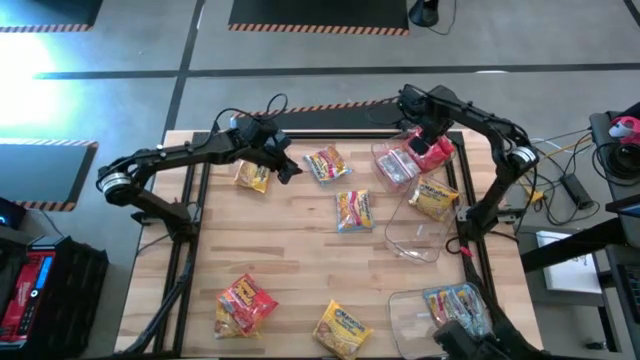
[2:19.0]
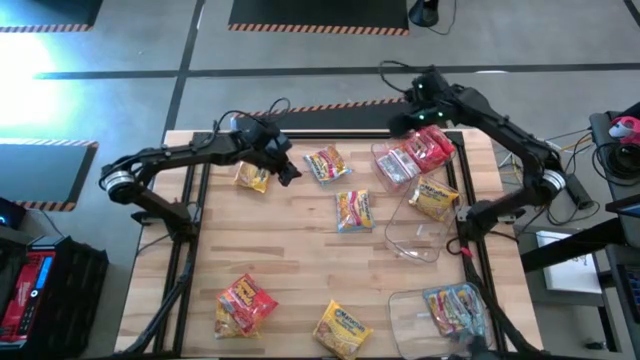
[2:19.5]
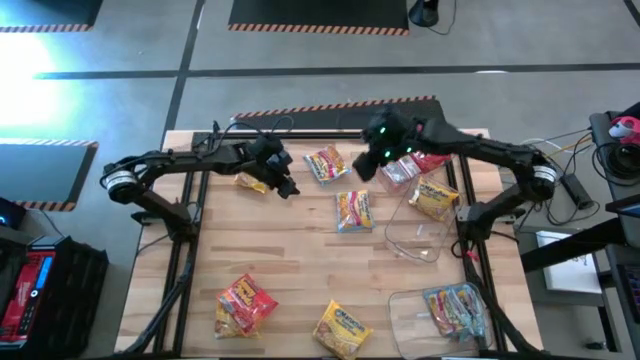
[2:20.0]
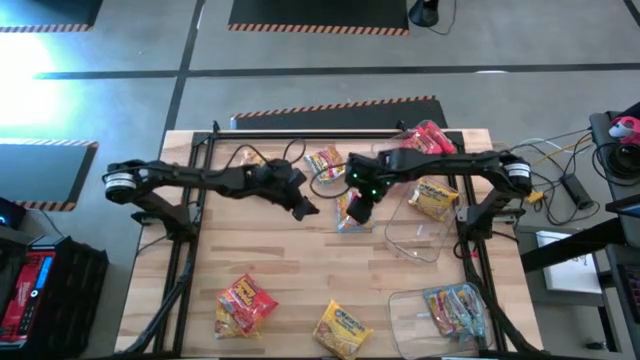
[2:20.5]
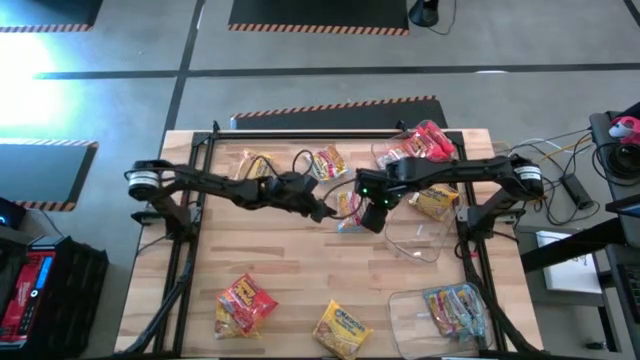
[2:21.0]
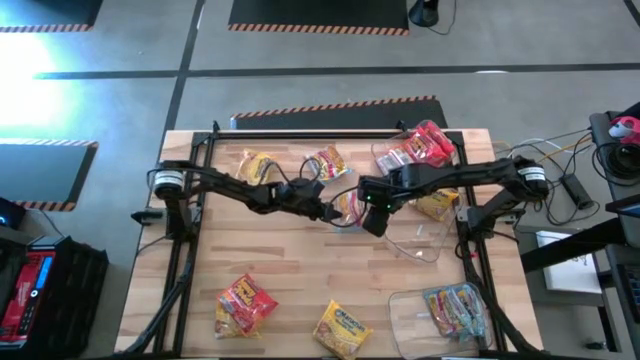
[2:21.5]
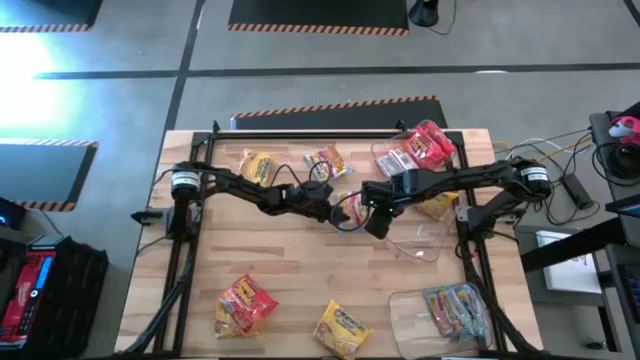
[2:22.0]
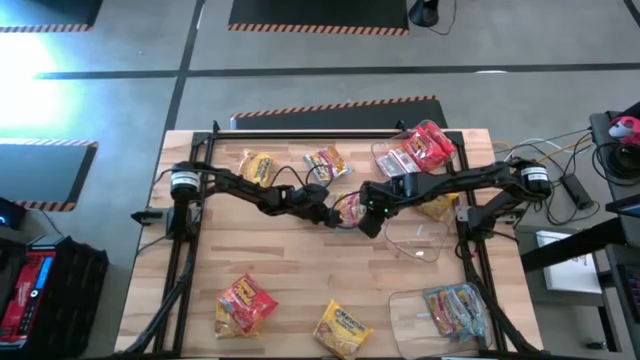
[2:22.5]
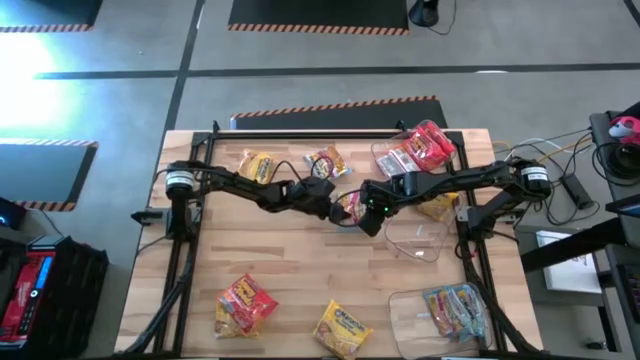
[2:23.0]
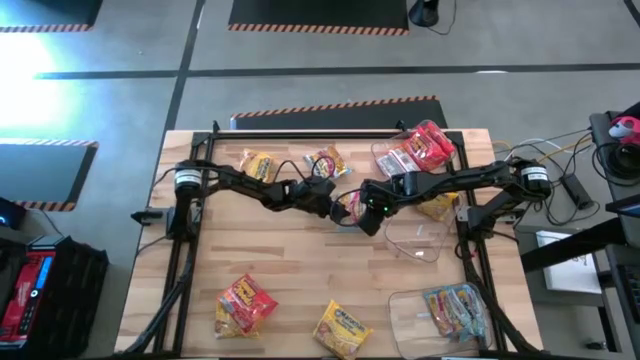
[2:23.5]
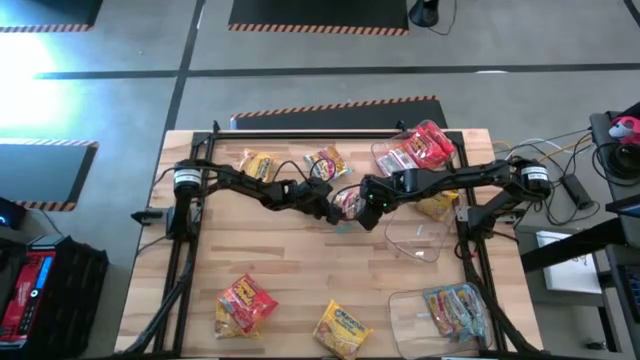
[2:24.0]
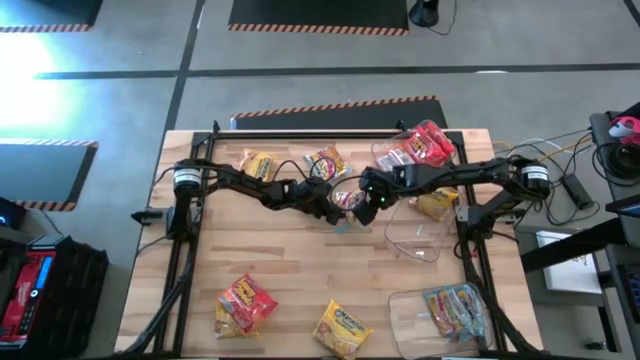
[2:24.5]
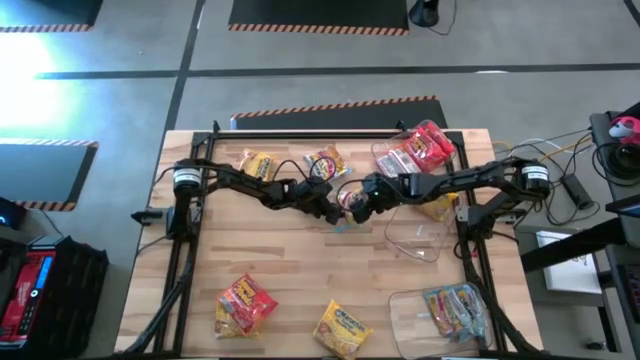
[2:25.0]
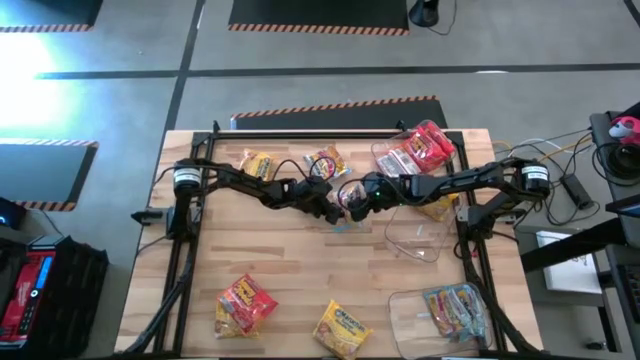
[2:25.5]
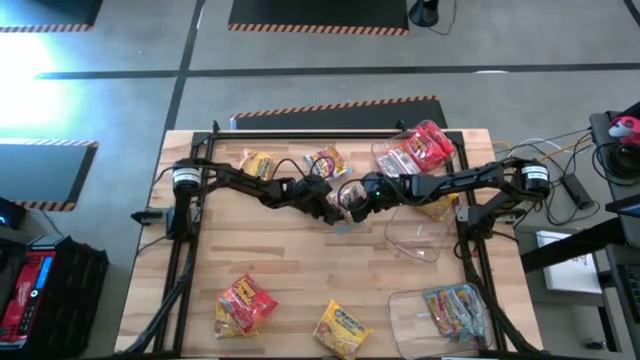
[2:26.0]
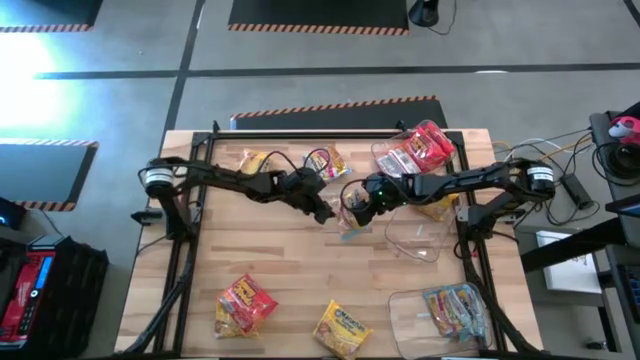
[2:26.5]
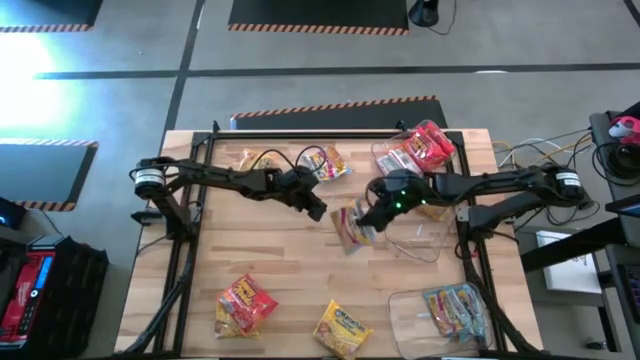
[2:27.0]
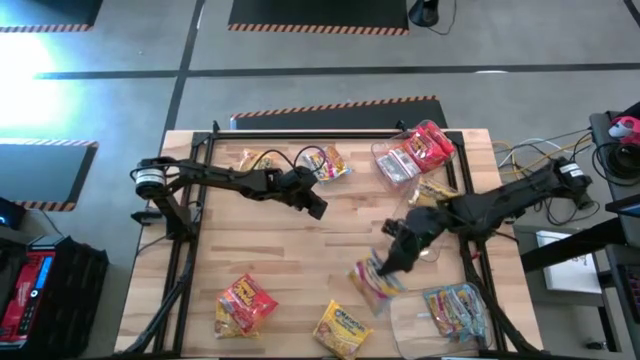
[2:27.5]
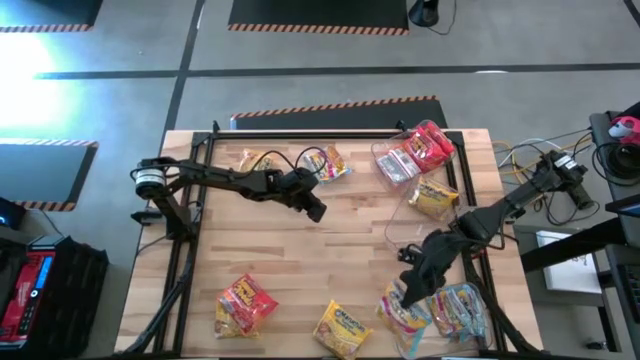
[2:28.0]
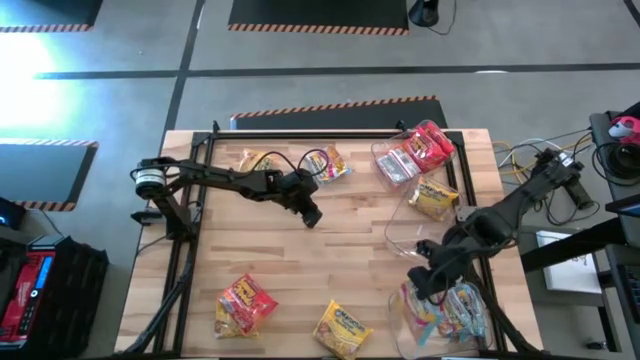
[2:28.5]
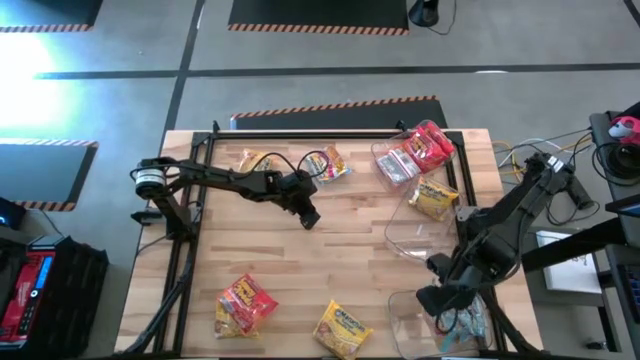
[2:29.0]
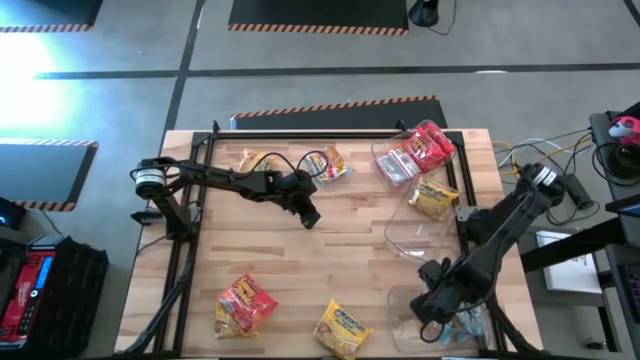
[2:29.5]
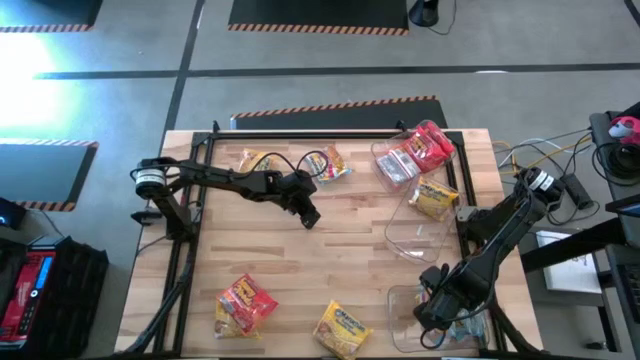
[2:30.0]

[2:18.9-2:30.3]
Task: Sort Maruchan noodles
Put the blue noodle pack into the bottom transparent bin

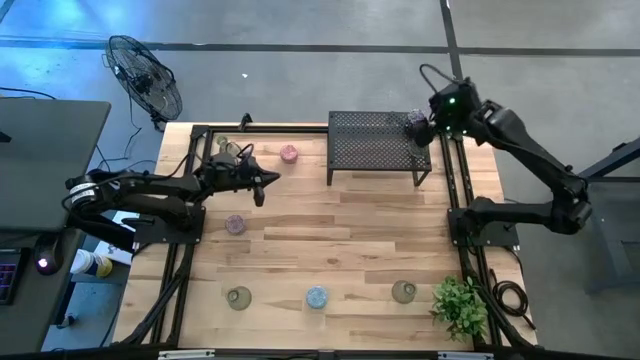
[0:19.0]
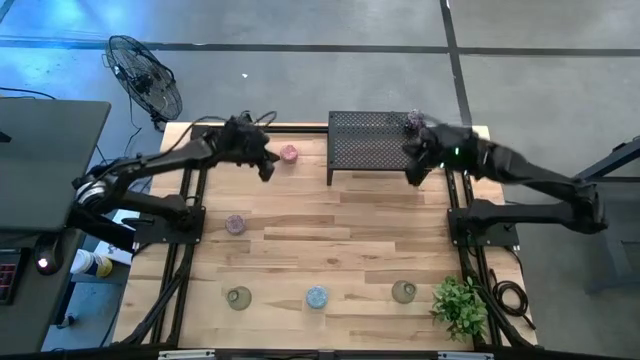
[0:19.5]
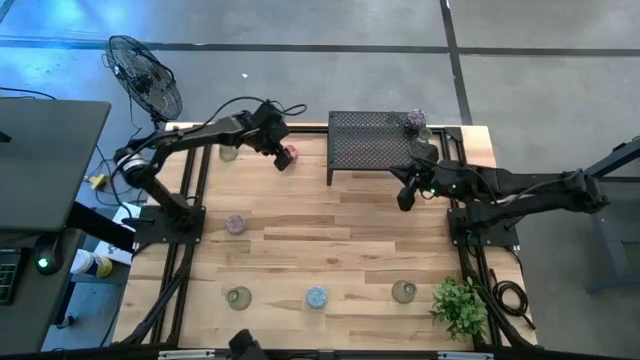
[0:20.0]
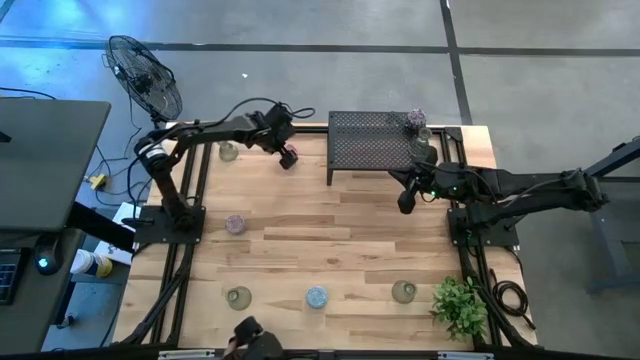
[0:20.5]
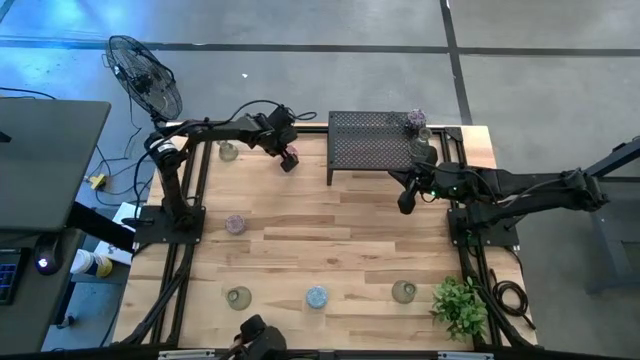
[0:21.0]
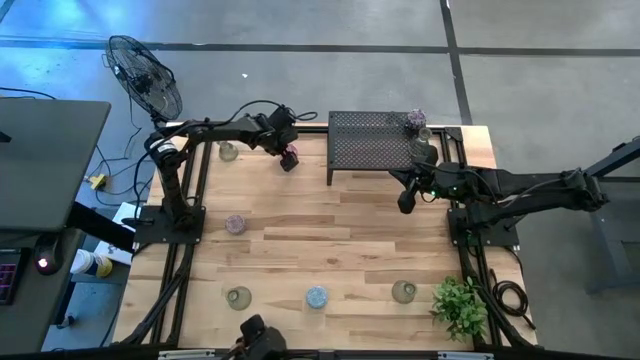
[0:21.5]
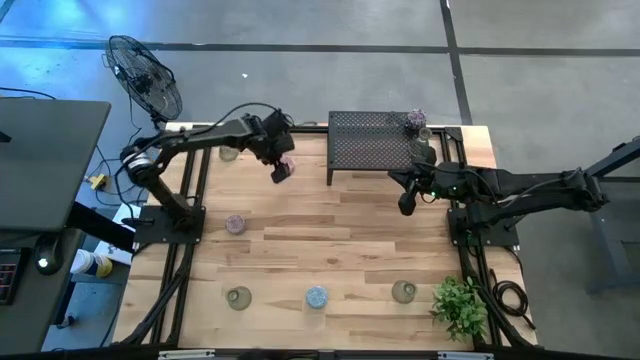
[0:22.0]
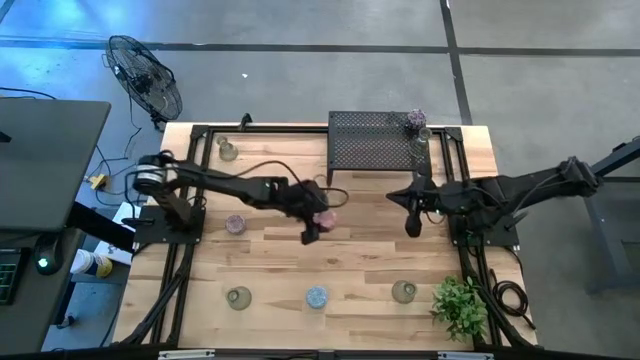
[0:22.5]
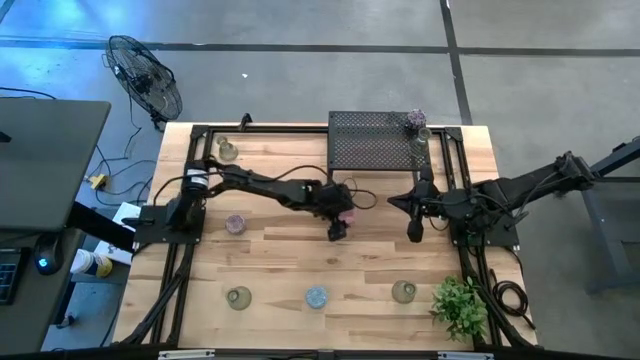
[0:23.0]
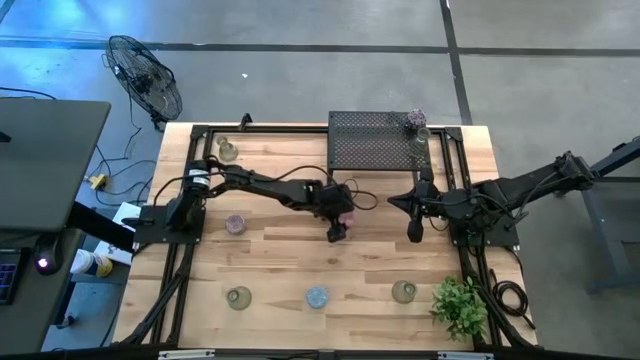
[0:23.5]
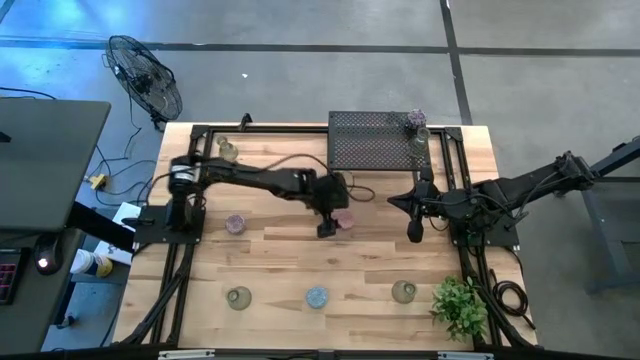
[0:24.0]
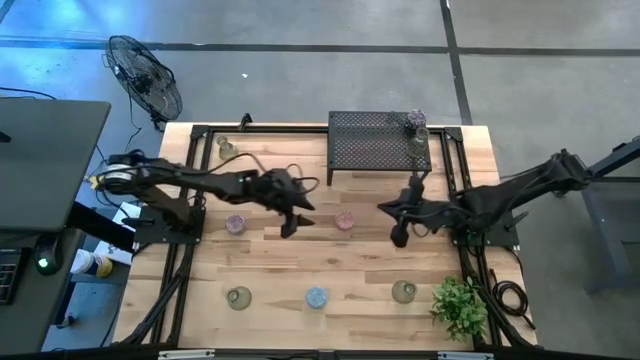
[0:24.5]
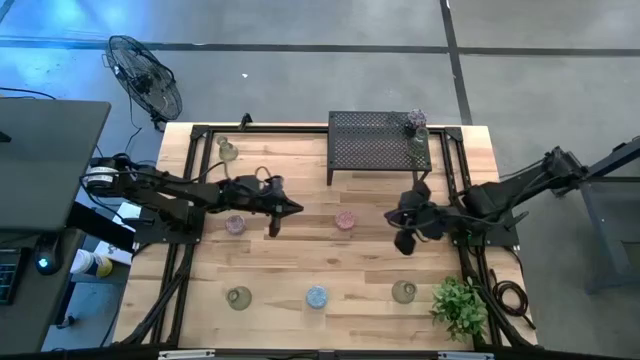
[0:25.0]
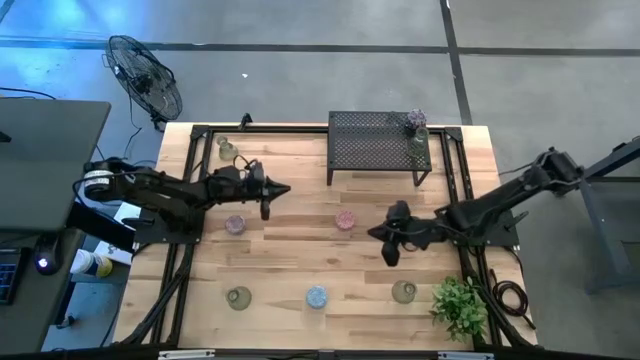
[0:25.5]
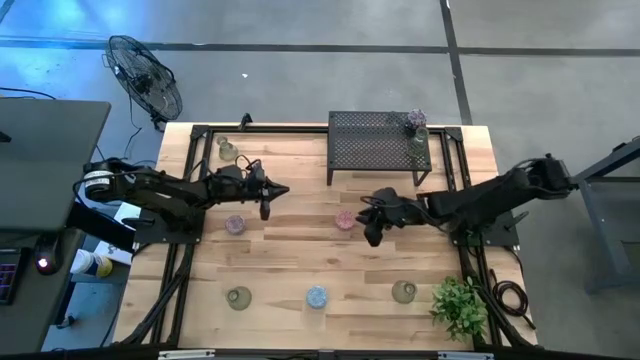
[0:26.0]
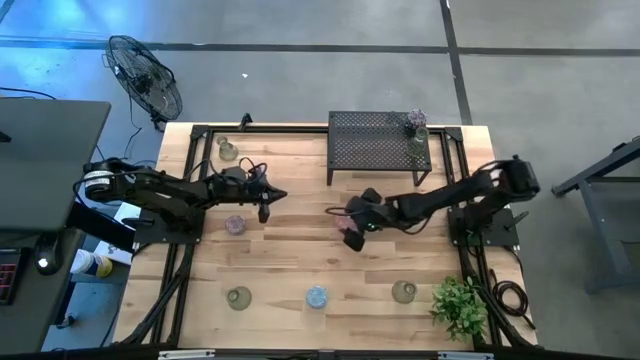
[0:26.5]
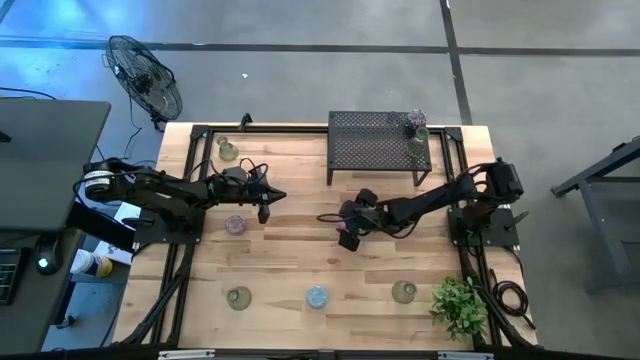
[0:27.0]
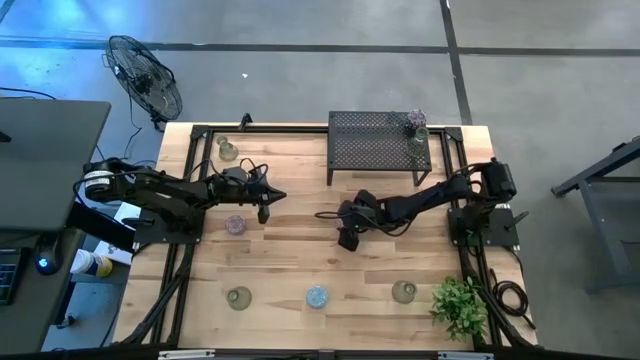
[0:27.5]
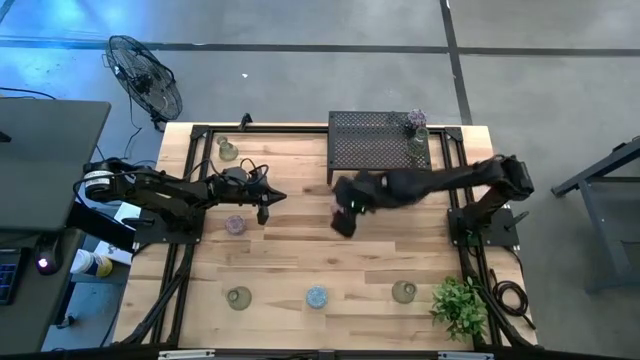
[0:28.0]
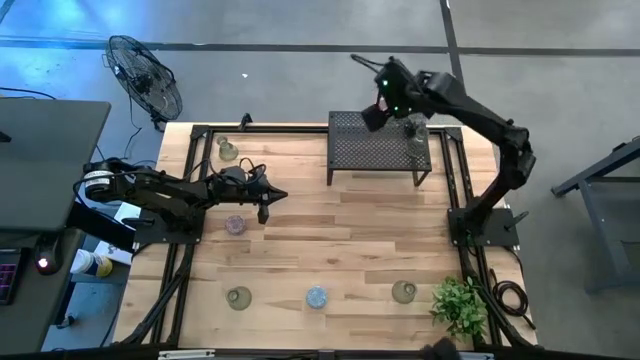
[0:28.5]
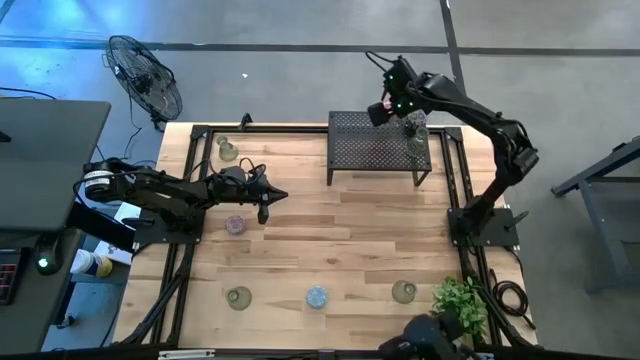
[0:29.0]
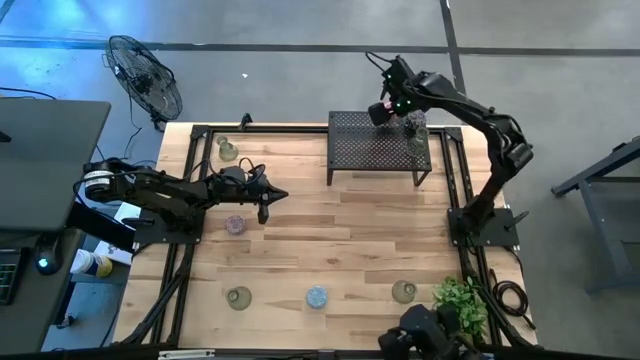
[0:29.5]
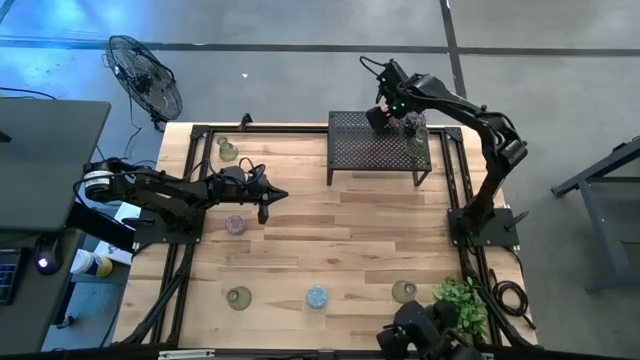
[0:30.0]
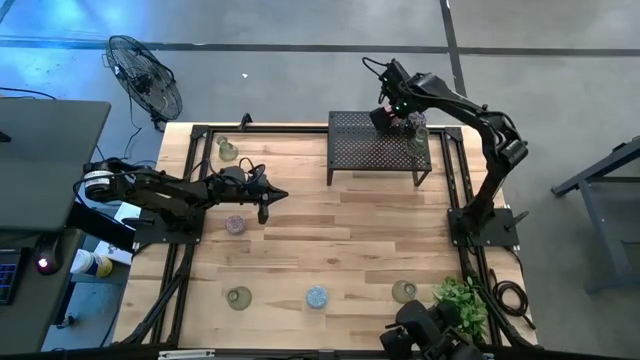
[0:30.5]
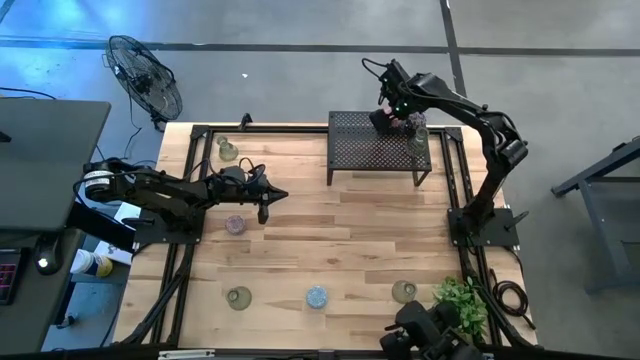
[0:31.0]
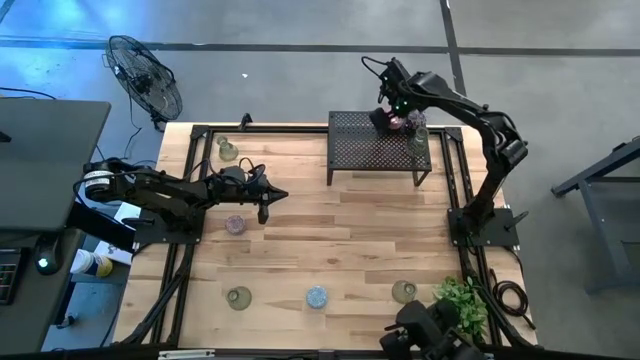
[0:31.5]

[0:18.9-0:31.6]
Task: Pick & Place candle stick holders
Put the pink scented candle on the shelf
